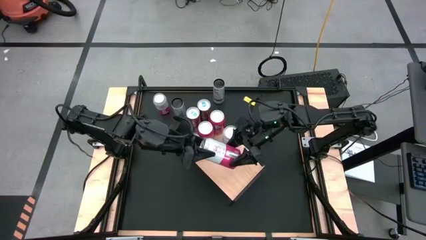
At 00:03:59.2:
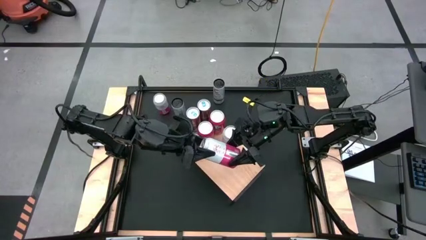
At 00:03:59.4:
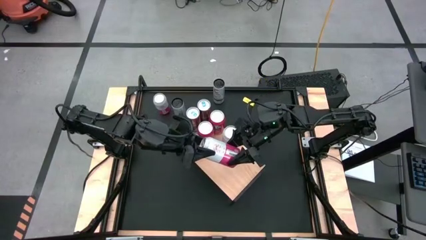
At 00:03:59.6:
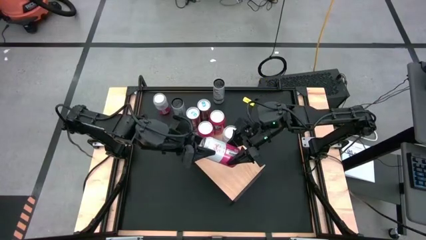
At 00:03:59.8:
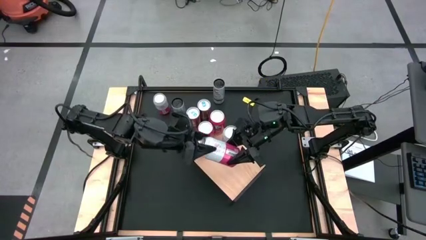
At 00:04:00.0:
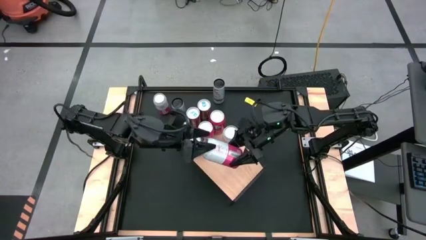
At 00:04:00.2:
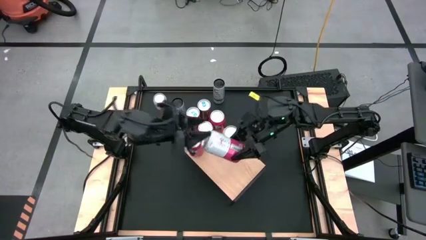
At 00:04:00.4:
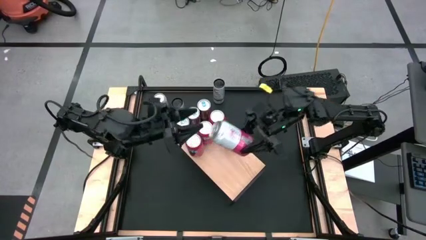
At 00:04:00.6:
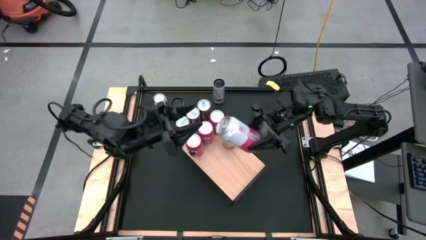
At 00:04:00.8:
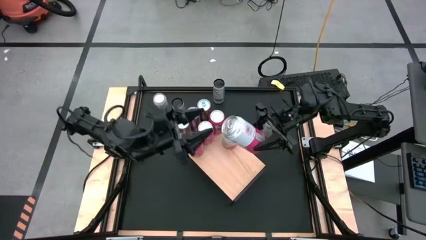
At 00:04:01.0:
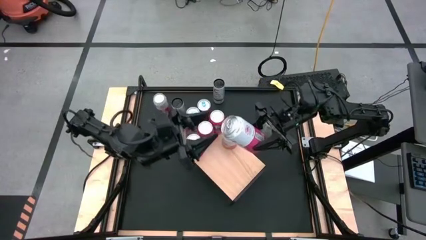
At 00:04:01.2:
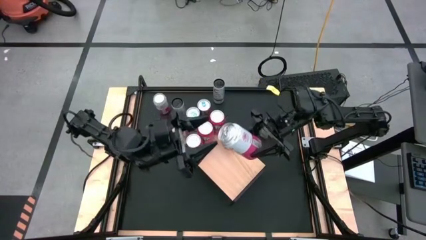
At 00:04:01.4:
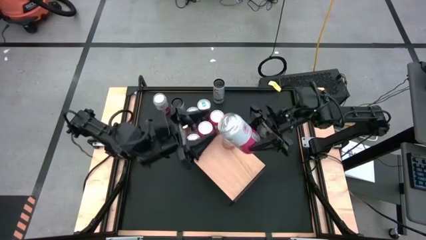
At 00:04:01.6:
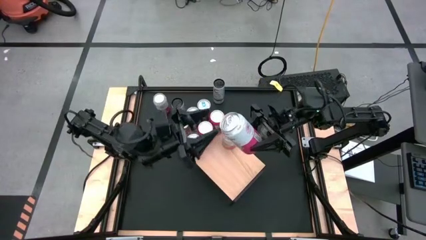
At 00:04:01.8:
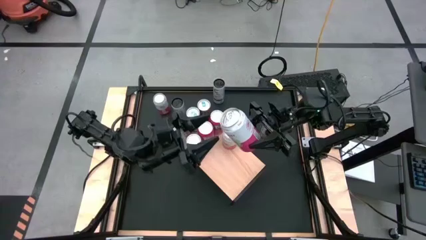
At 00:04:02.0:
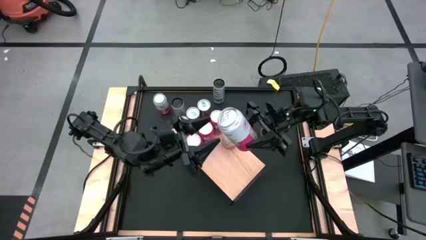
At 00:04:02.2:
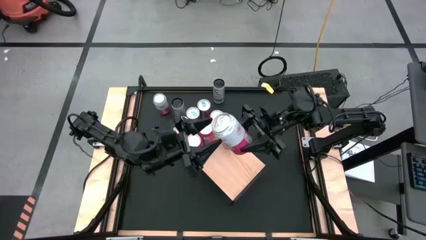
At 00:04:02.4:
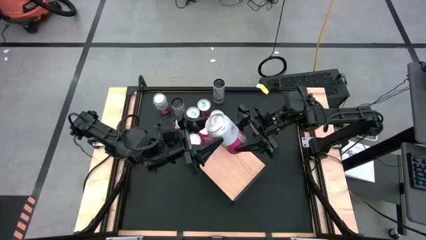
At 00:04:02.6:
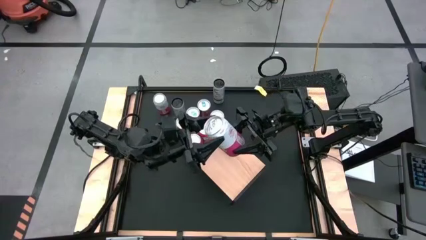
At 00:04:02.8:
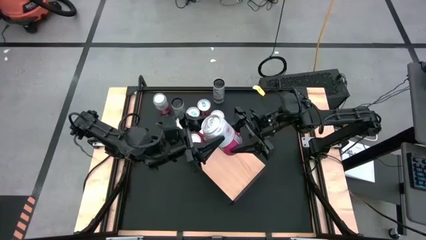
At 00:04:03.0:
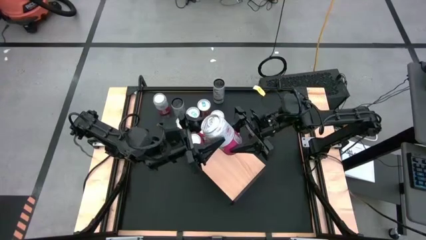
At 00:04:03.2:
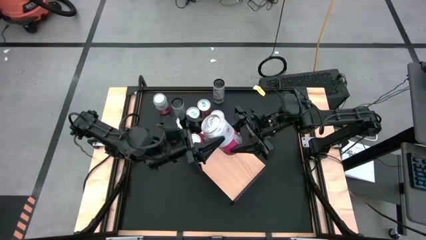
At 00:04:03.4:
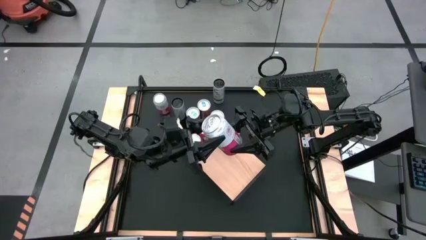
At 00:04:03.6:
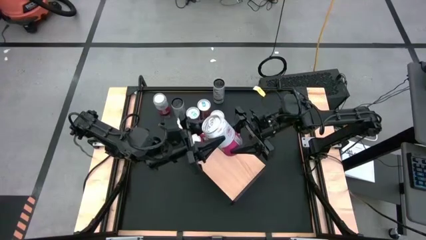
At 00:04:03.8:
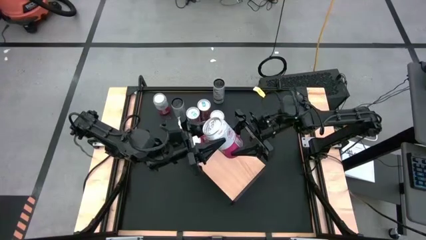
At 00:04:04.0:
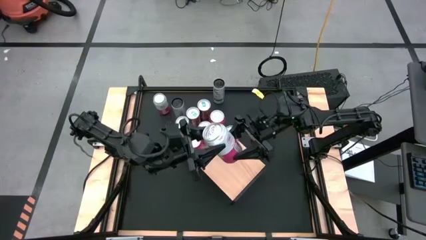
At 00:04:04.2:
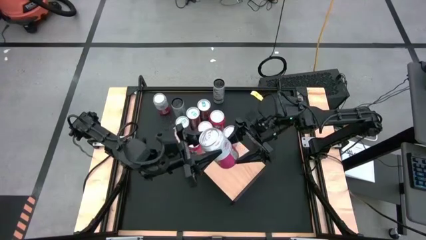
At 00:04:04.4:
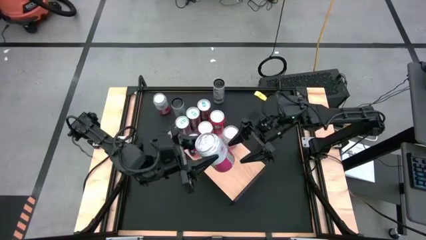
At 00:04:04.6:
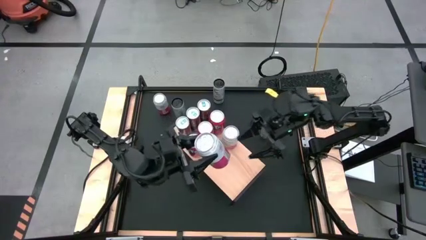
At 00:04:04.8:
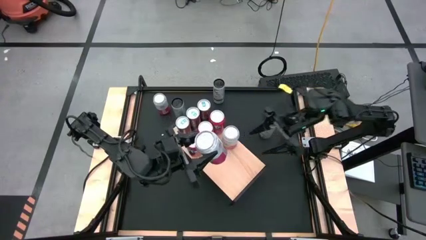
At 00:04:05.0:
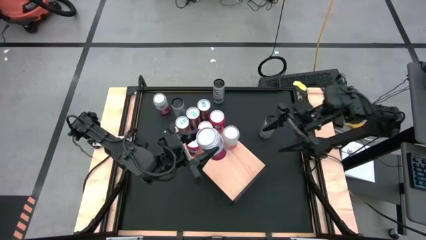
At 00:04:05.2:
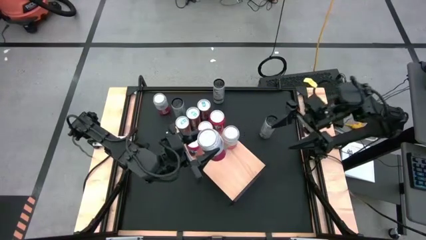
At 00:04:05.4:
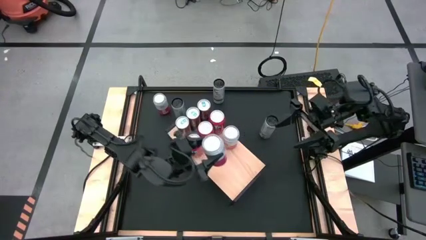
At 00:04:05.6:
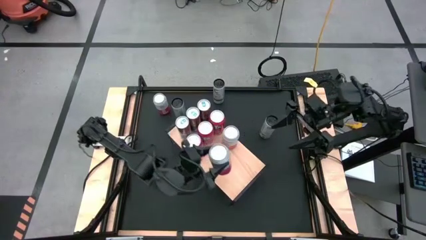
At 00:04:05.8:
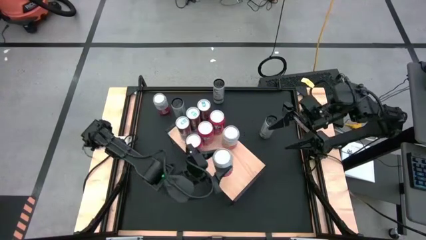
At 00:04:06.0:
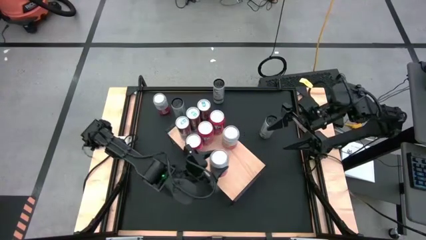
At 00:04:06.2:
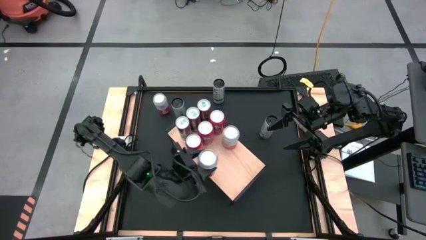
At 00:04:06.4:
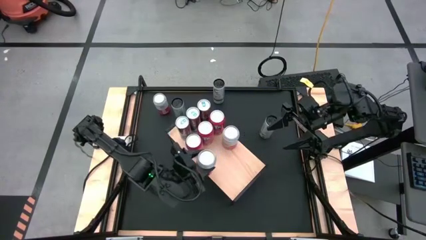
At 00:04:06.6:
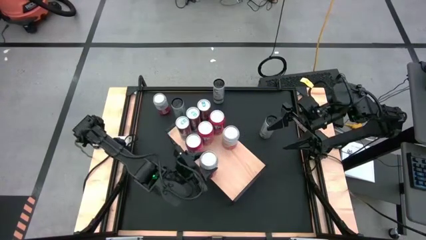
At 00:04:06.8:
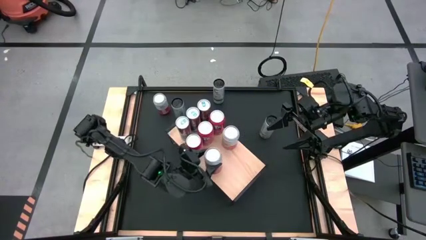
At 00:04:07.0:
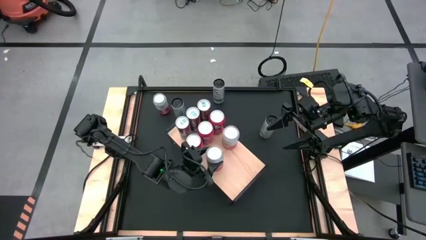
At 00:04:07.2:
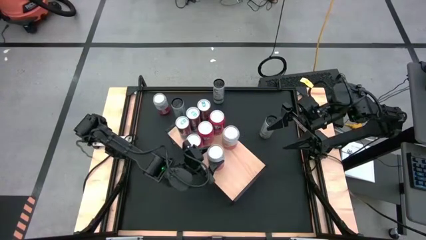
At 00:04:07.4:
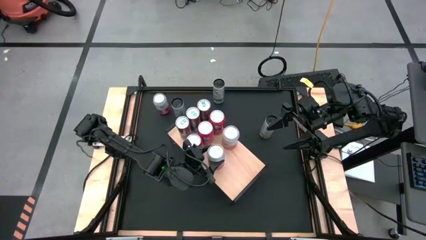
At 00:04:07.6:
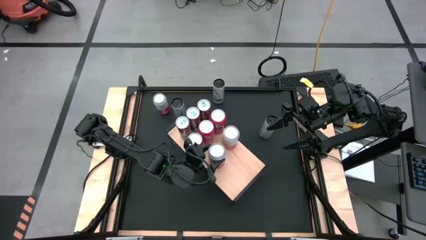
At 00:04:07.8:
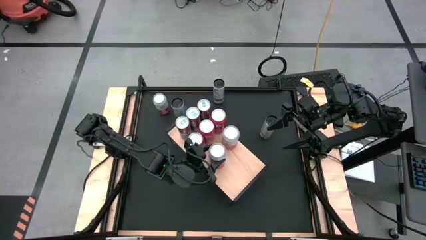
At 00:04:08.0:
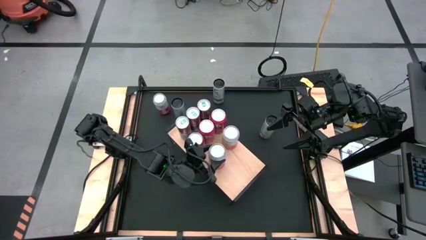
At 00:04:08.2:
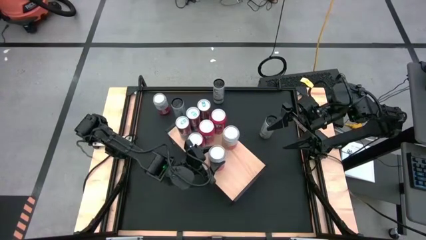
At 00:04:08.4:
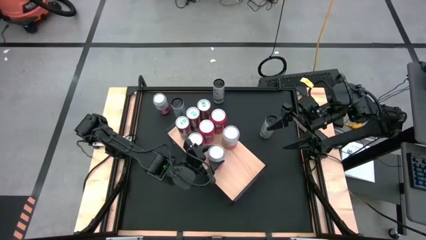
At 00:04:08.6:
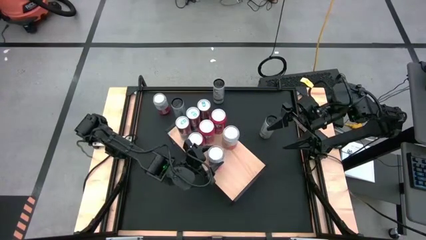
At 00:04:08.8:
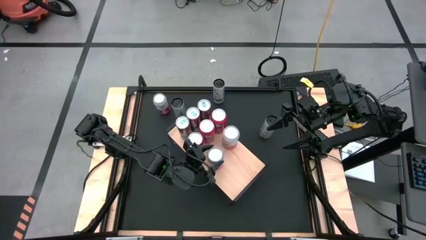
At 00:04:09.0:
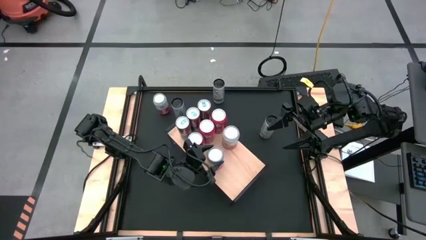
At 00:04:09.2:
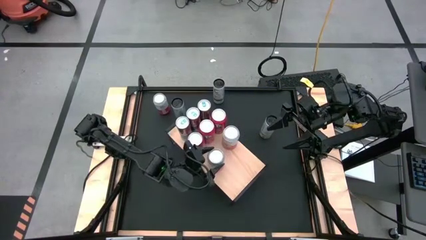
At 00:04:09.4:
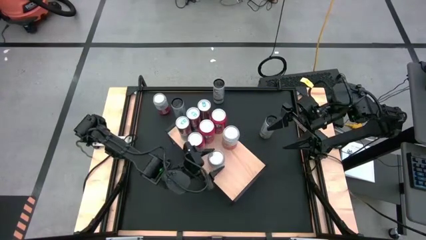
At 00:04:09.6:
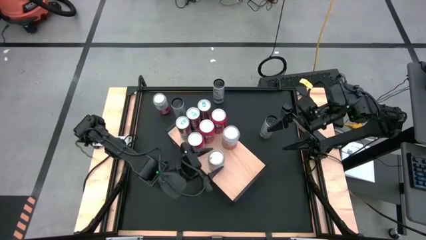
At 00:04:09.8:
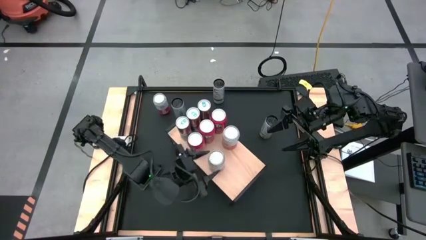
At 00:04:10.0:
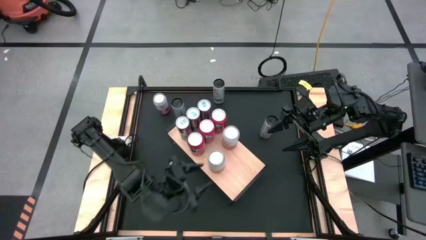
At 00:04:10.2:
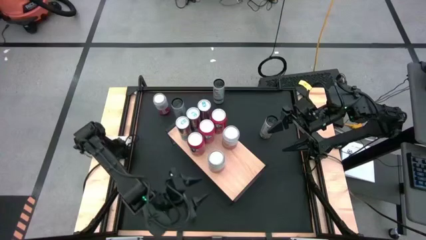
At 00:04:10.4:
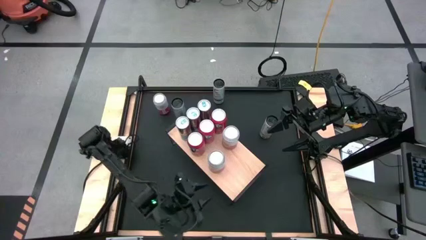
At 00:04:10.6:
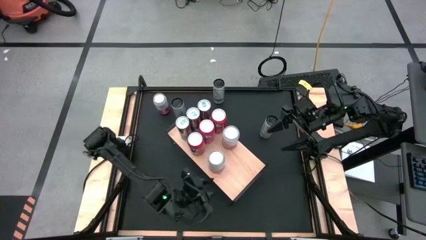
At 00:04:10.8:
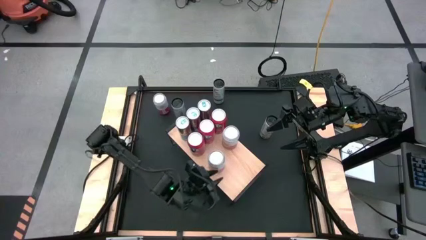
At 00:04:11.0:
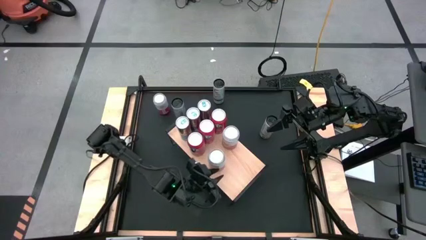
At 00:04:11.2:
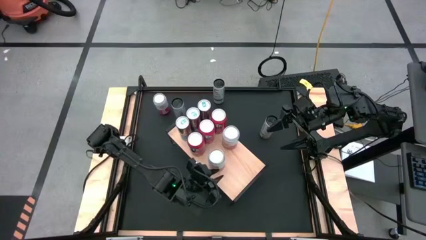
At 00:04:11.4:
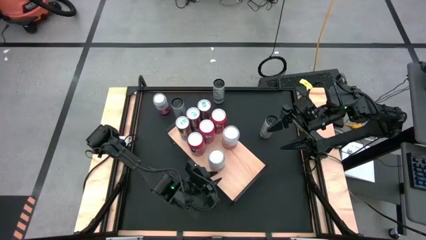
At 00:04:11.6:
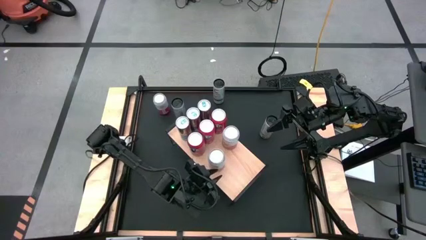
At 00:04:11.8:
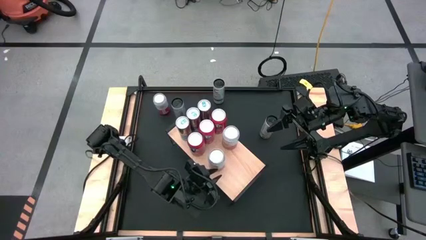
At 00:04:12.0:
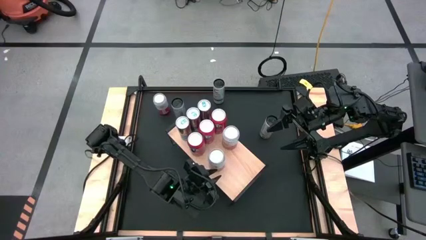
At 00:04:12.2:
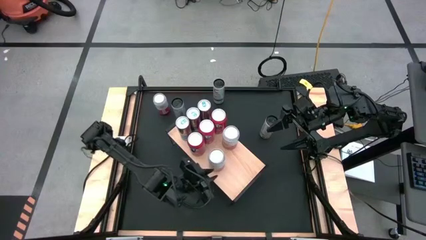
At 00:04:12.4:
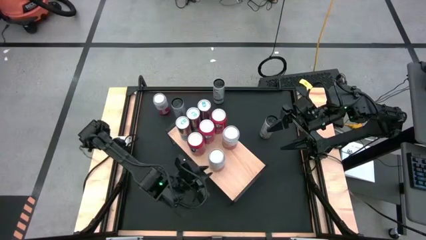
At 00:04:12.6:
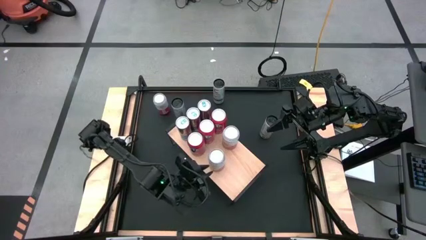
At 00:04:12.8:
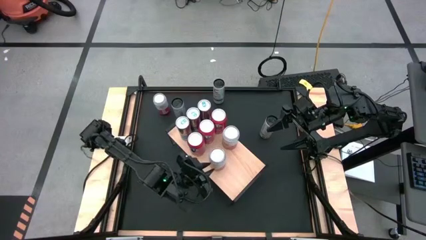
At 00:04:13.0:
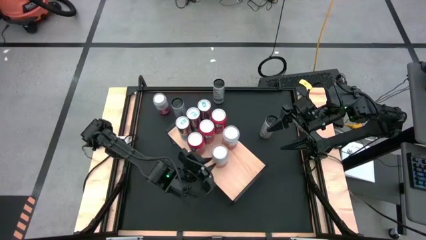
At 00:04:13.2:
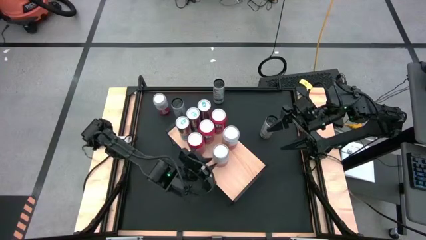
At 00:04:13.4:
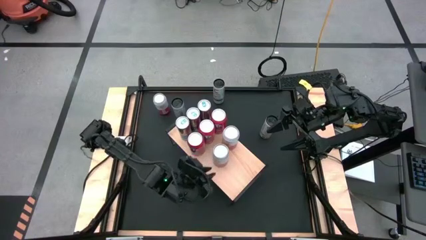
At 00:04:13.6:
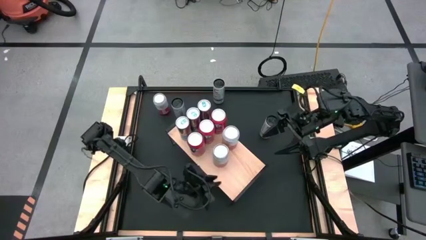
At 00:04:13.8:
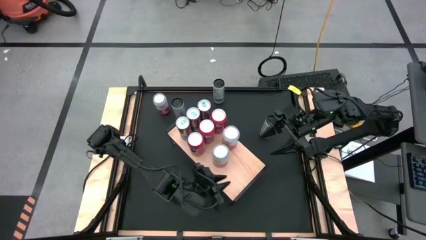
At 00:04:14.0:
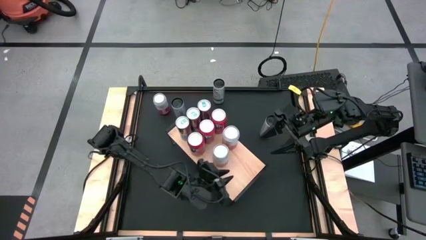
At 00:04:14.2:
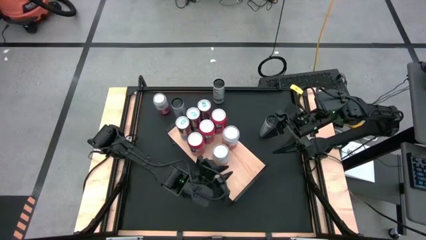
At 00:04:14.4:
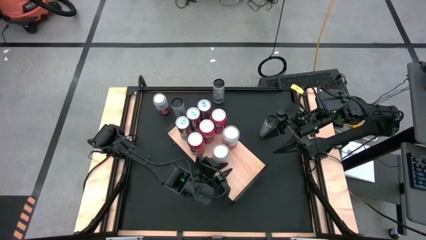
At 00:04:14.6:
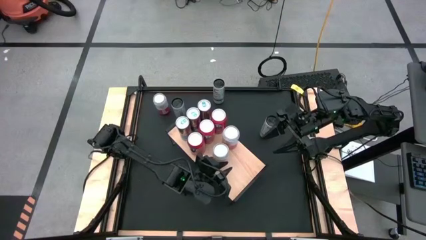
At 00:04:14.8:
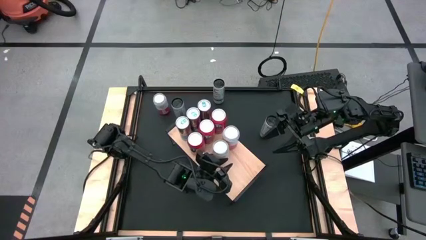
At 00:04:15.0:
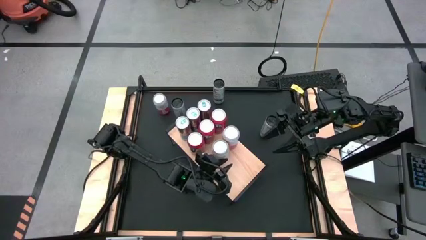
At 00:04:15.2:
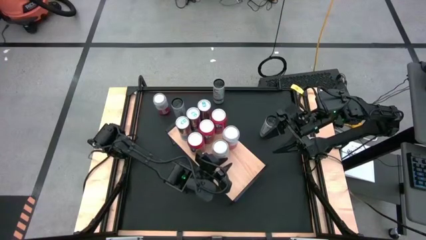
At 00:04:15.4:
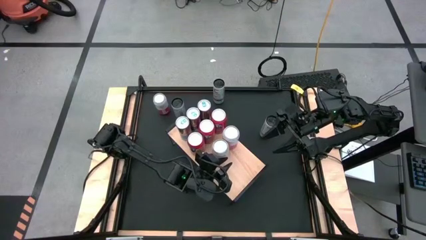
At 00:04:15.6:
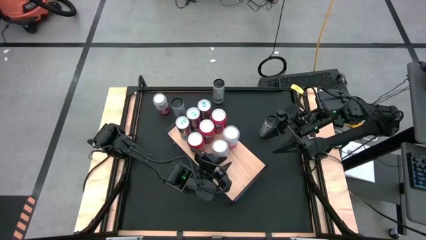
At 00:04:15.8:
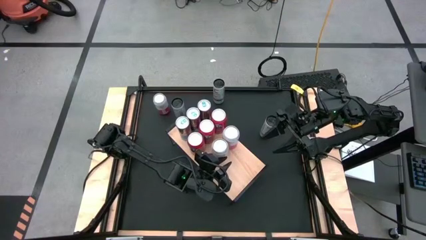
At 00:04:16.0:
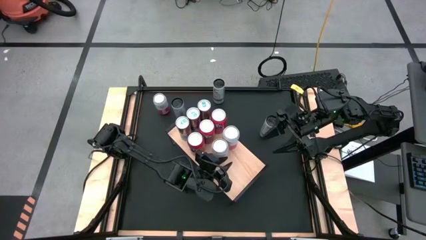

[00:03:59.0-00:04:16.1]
Task: Place canned beverage on shelf
Put the bottom pink soda can on the shelf aligned with the other pink soda can
